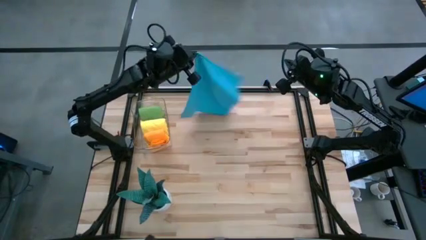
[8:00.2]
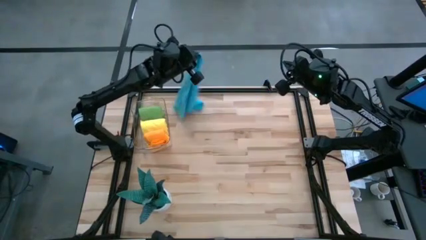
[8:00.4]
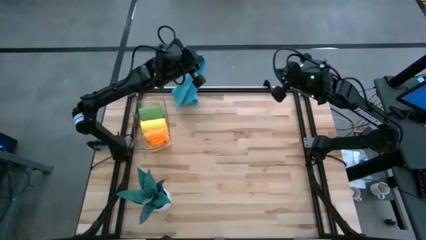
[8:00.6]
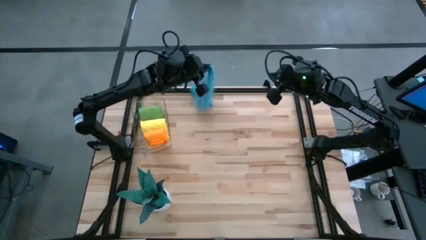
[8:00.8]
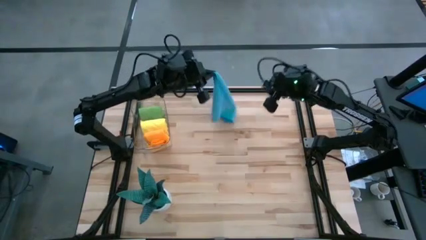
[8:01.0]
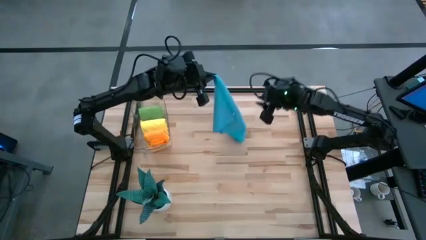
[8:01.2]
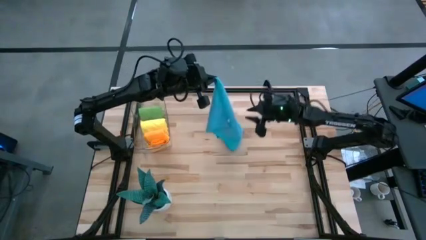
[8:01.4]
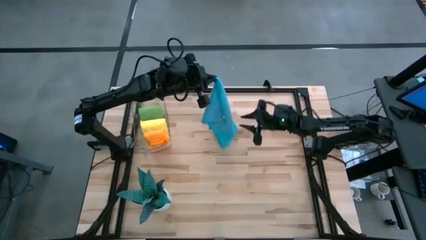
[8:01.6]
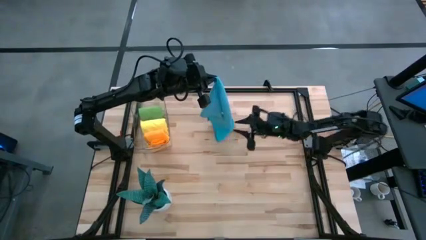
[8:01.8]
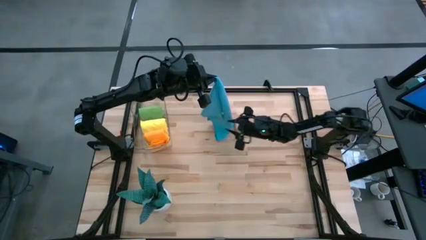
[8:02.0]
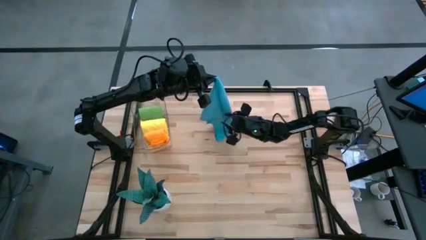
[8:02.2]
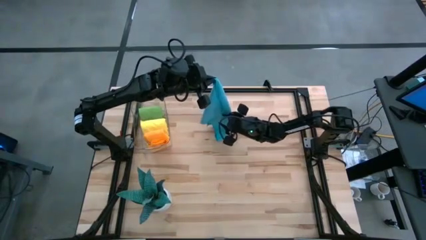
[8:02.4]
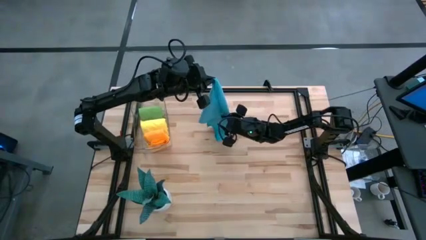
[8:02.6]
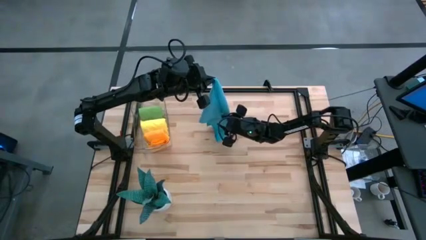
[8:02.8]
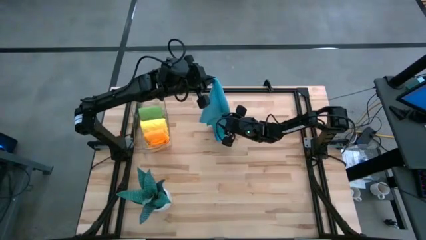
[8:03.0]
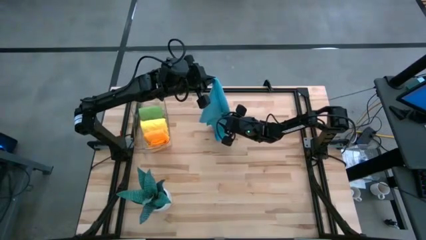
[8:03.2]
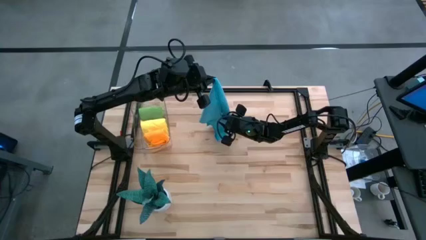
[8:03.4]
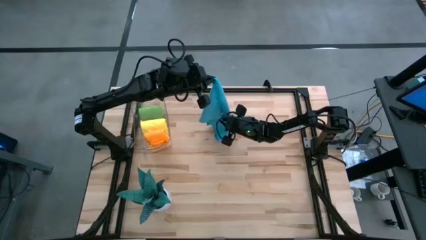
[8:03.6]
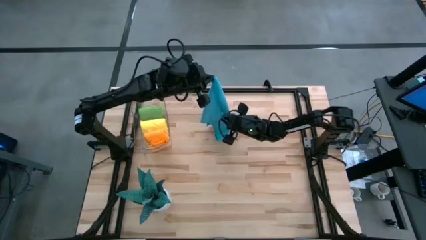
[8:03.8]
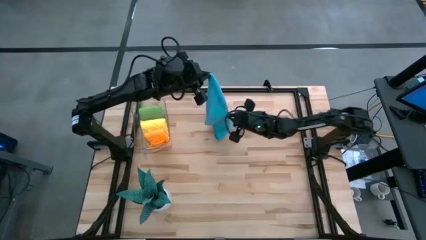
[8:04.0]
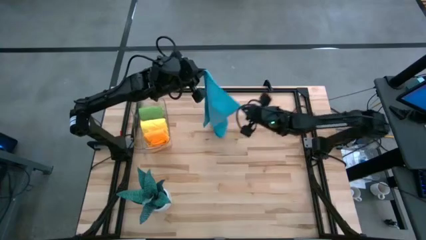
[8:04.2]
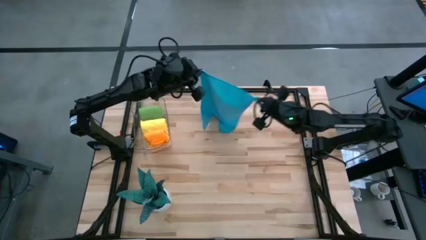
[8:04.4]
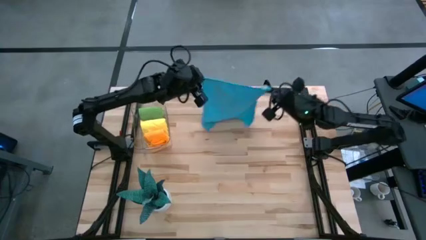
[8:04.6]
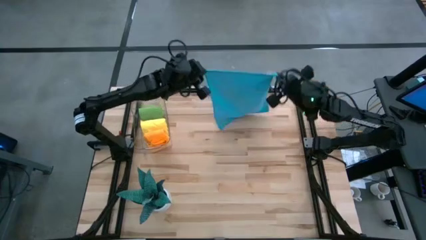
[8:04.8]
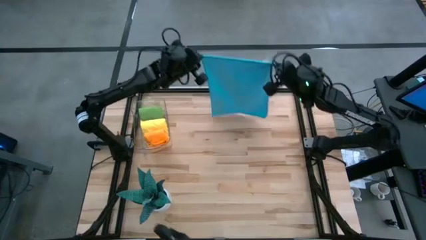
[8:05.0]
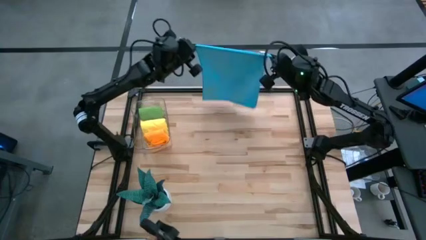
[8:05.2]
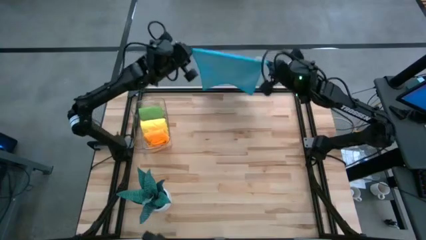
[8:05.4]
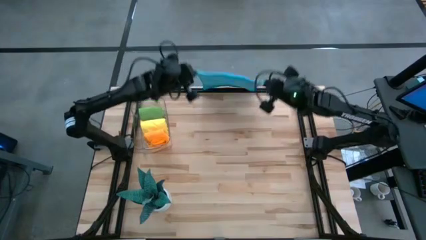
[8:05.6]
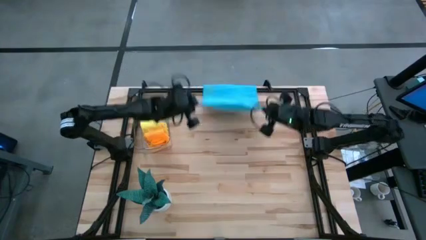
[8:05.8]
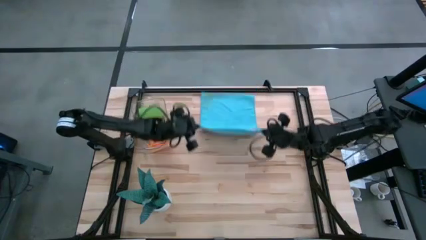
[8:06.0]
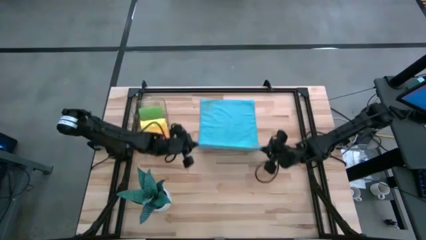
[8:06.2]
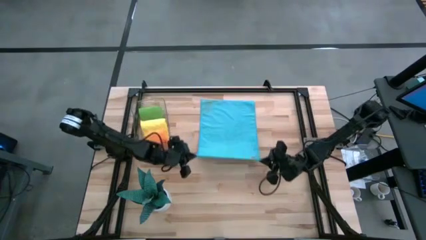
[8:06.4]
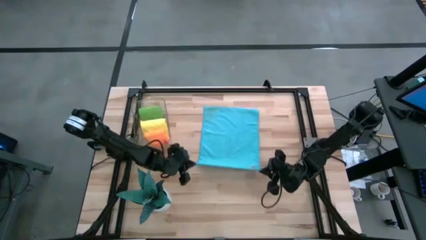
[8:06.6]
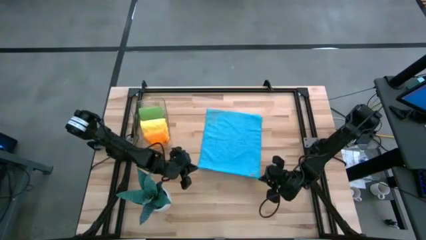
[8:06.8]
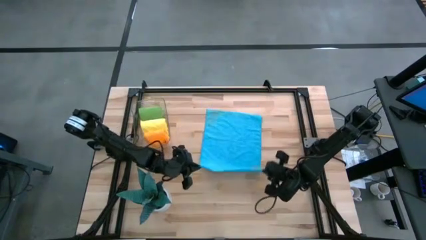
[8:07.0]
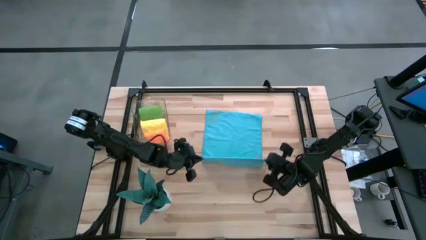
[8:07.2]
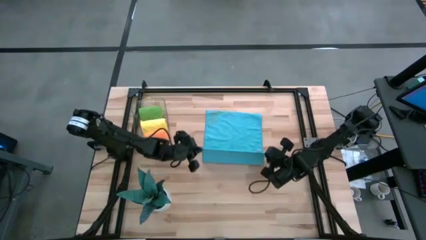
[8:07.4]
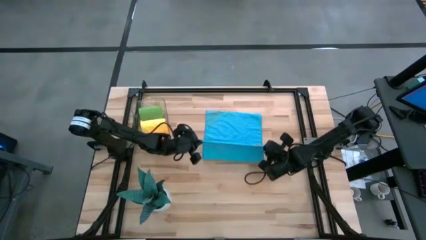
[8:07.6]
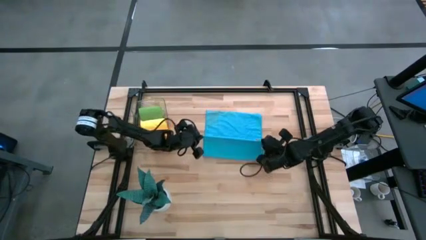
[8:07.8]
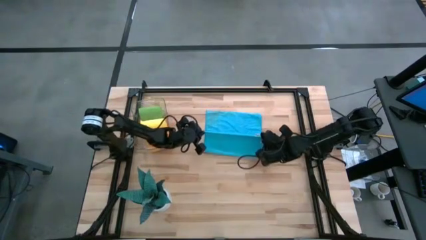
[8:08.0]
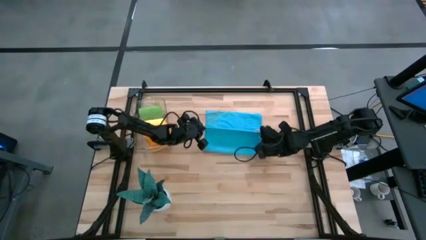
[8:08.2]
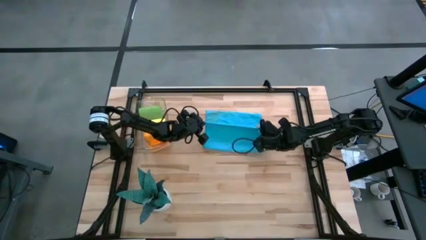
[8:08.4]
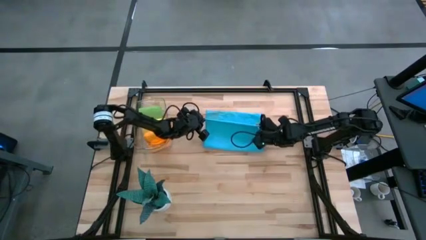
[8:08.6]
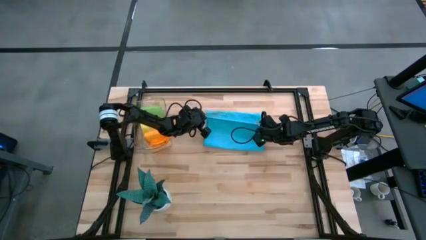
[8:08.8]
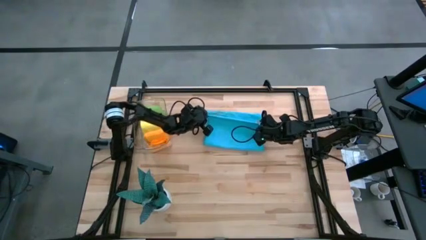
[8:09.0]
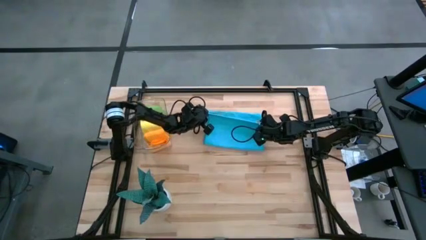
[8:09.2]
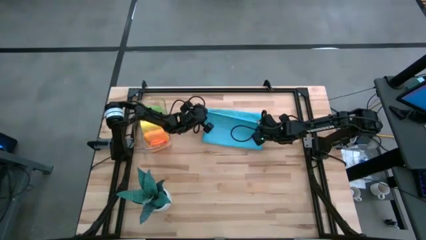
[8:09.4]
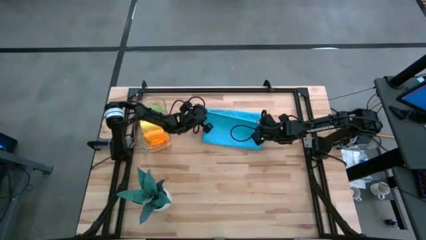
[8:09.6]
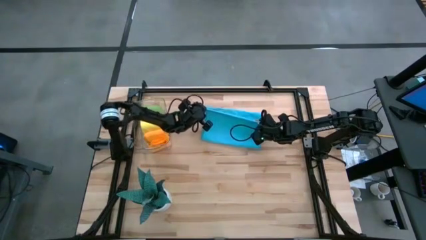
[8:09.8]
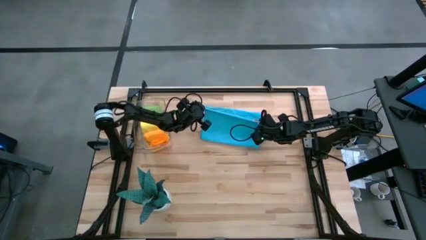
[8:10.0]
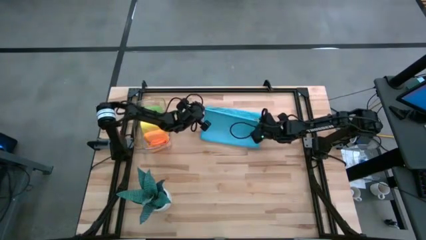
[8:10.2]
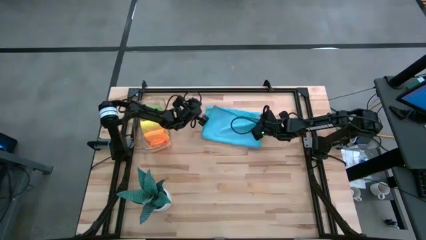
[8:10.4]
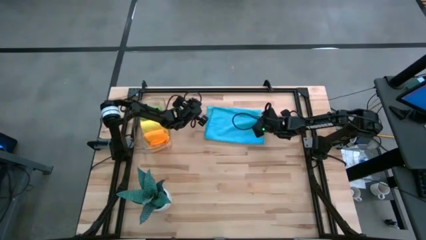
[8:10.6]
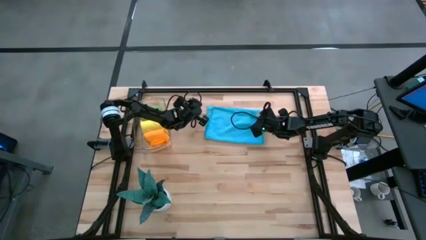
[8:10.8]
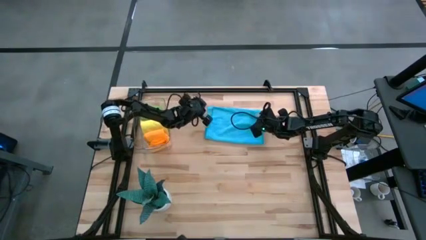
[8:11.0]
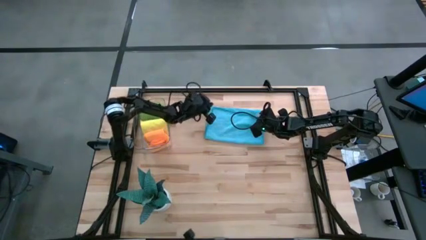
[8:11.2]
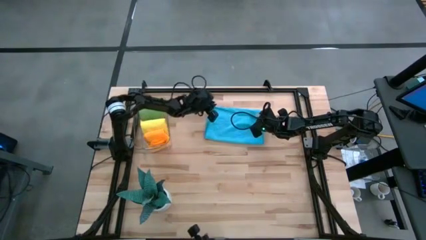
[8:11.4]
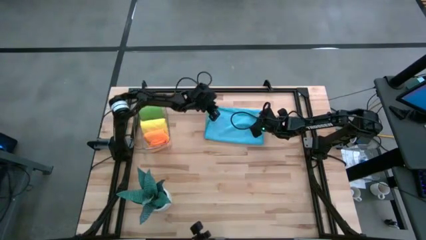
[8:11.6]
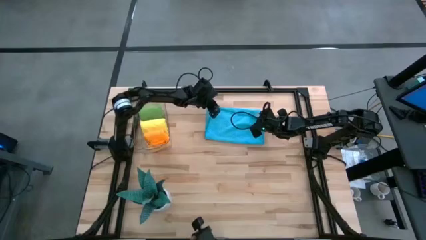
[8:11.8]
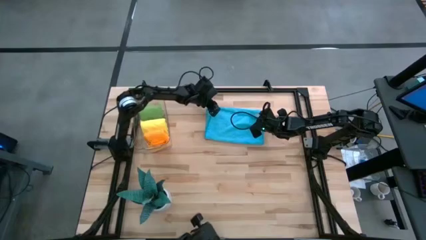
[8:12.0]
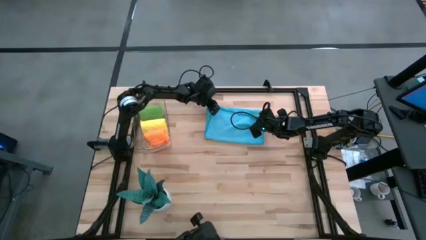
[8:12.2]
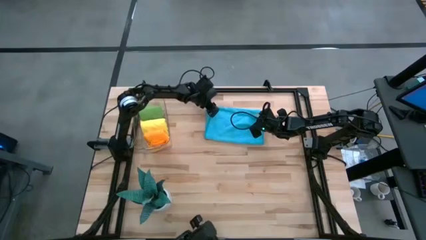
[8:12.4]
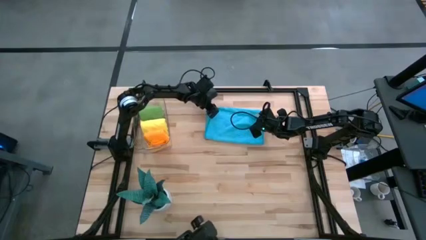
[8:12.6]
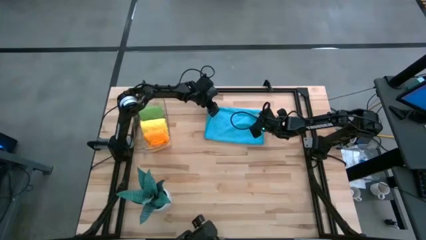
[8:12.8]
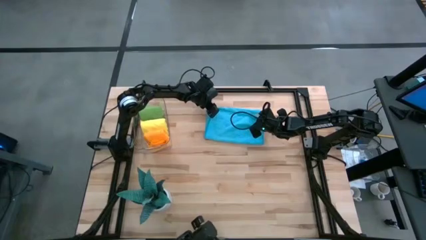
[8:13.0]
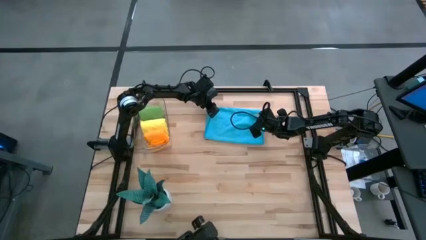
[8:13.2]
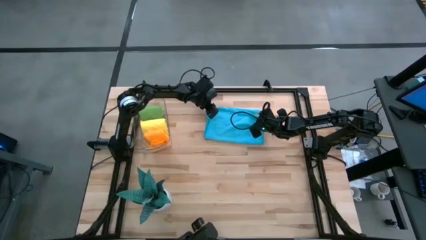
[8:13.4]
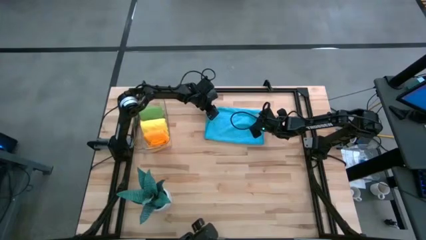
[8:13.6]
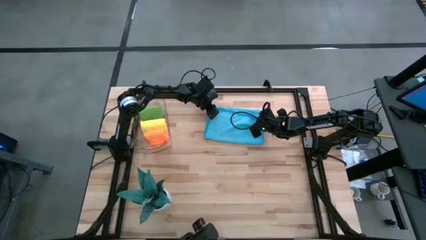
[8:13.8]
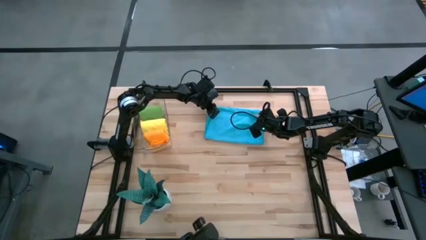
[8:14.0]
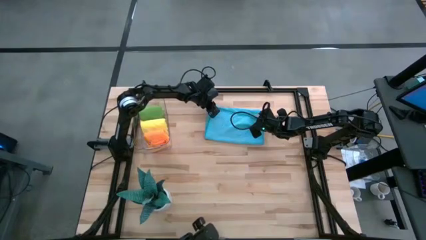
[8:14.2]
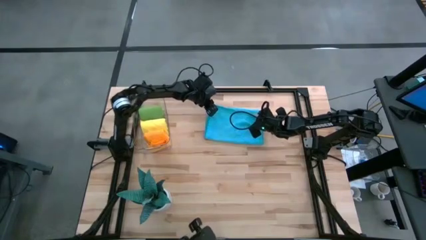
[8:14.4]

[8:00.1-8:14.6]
Task: Roll microfiber towels into tight, uniform cylinder then place into a basket
Fold the blue microfiber towel

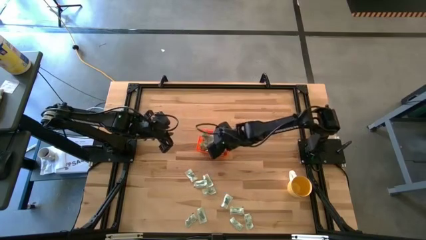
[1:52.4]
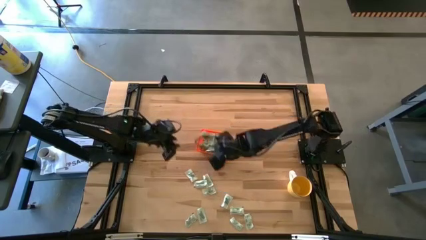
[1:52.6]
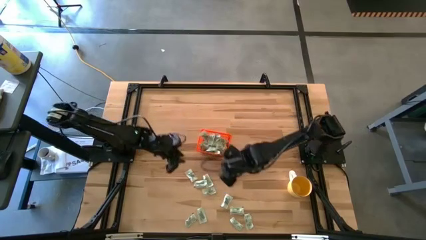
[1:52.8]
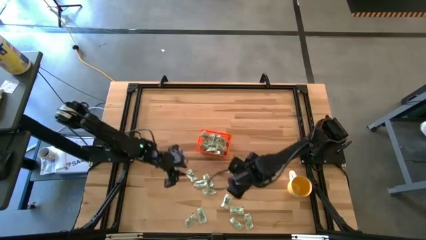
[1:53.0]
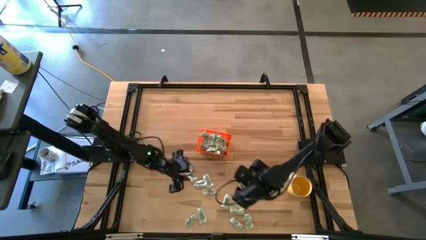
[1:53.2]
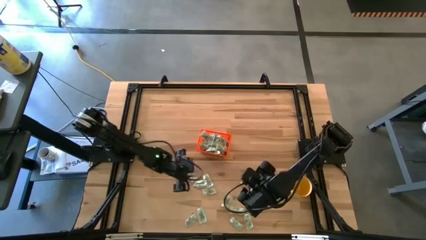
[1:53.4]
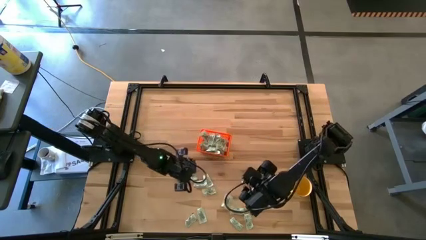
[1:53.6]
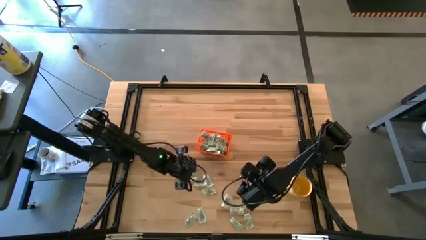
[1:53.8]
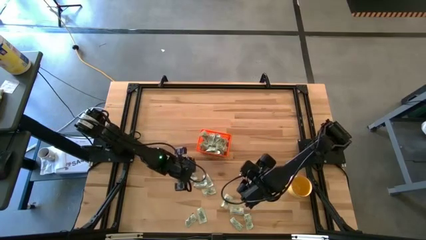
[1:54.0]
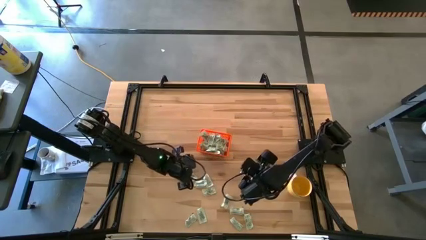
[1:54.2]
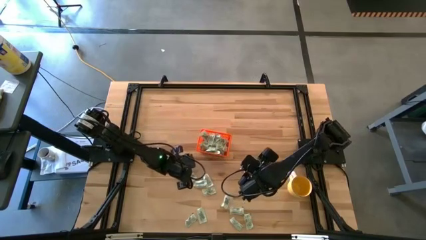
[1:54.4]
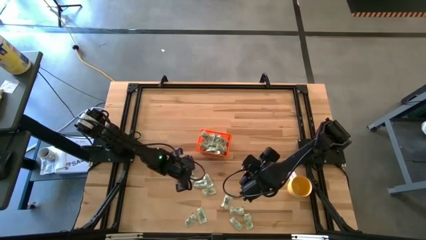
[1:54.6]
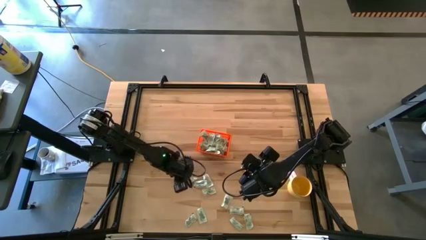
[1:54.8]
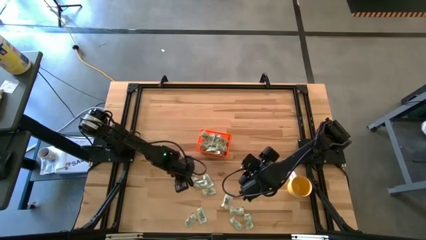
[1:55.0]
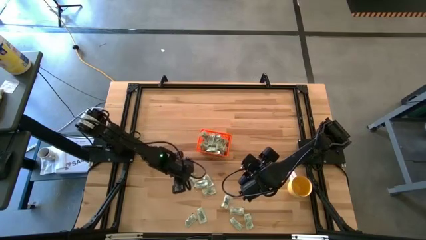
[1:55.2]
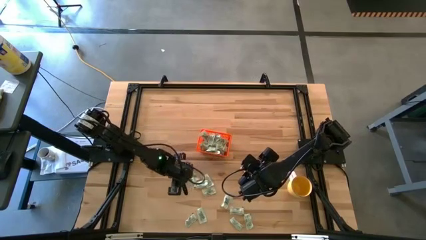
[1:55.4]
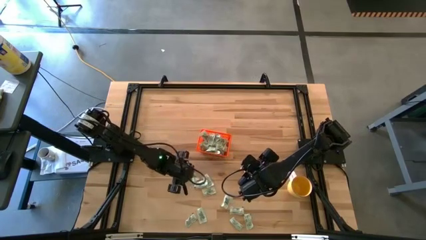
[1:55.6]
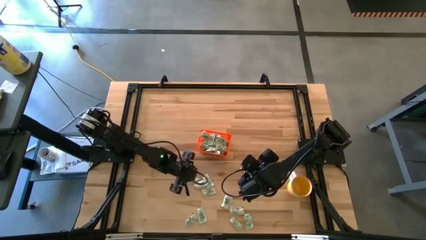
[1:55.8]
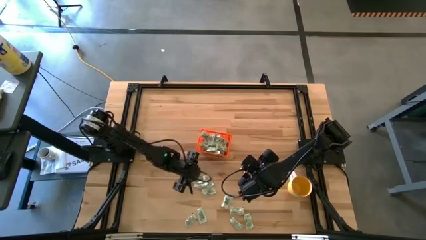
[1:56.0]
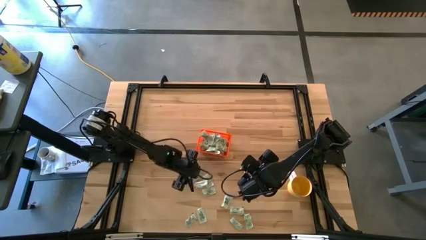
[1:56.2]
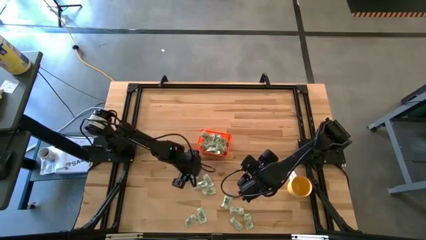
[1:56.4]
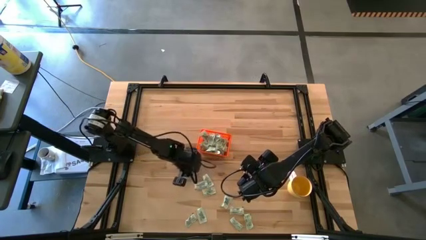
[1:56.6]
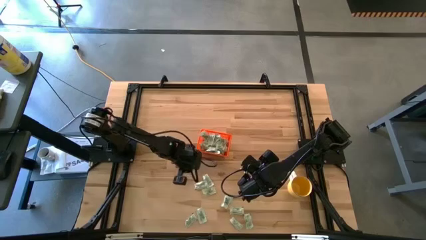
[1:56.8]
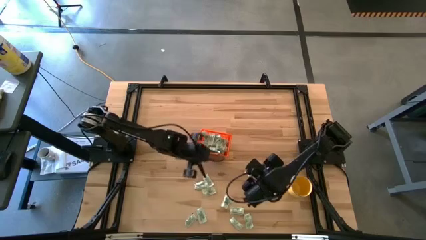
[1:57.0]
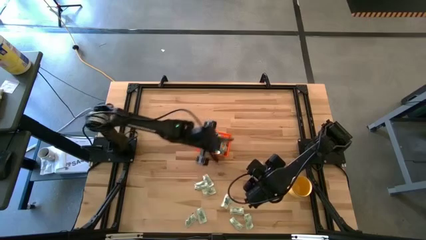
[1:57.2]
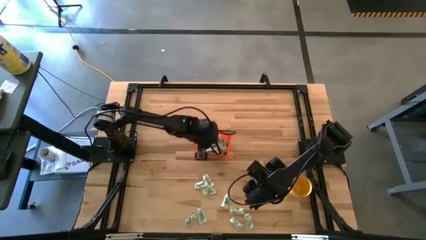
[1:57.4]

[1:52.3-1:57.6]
Task: Pick and place Stevia / Truvia into bins
Put the light green stevia packet into the orange bin
